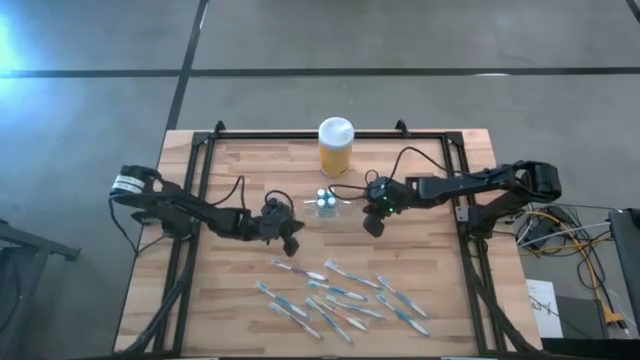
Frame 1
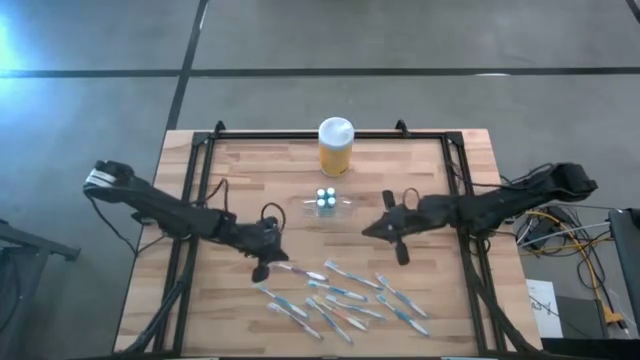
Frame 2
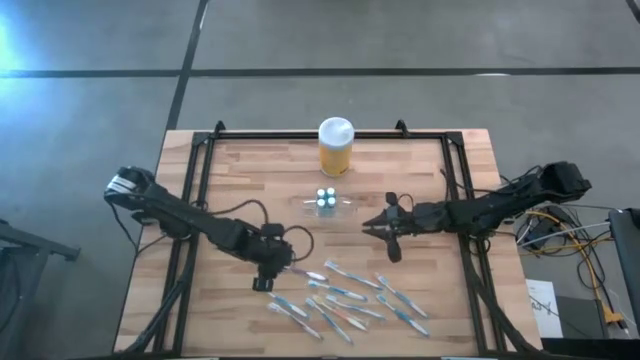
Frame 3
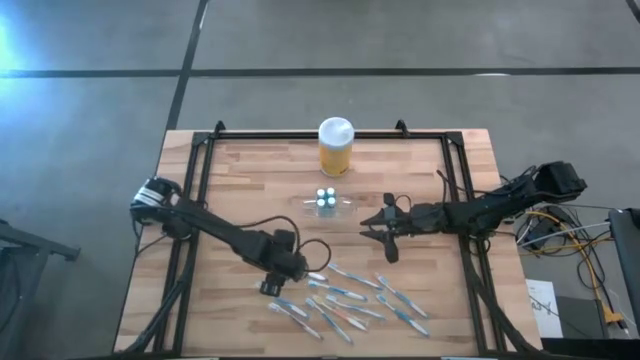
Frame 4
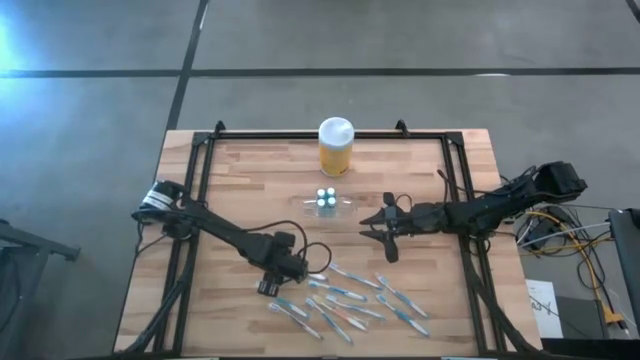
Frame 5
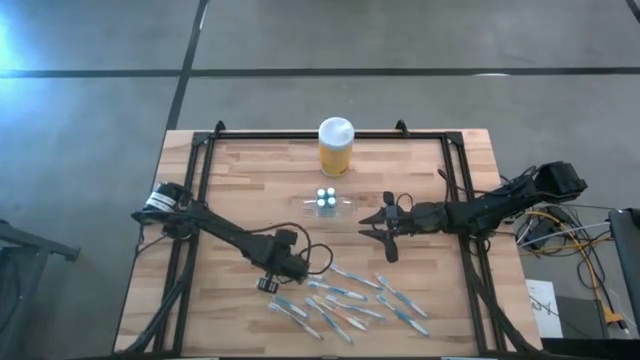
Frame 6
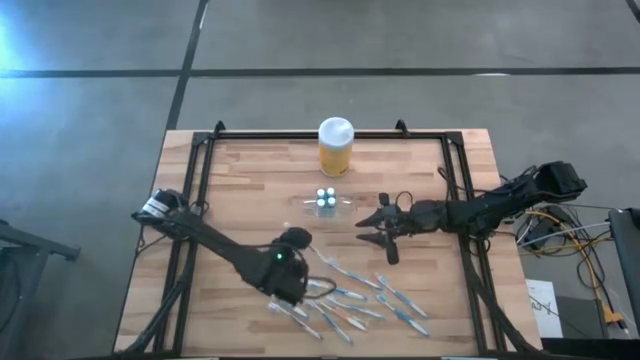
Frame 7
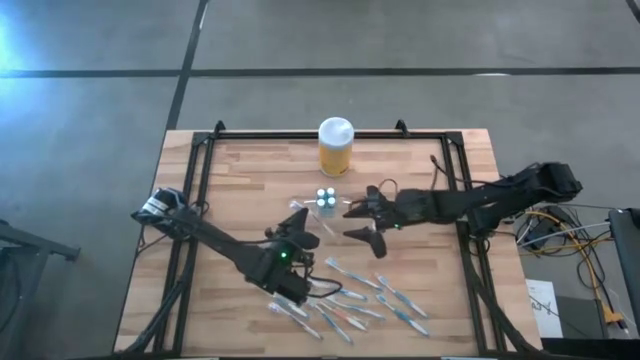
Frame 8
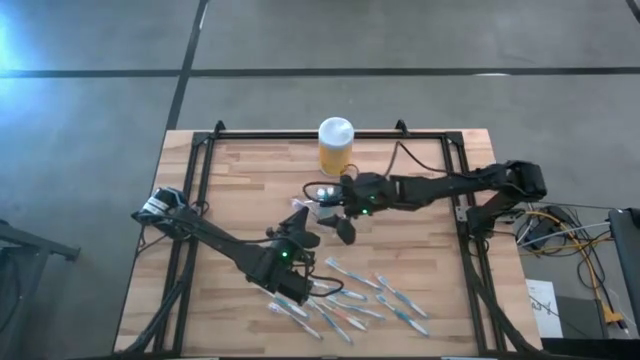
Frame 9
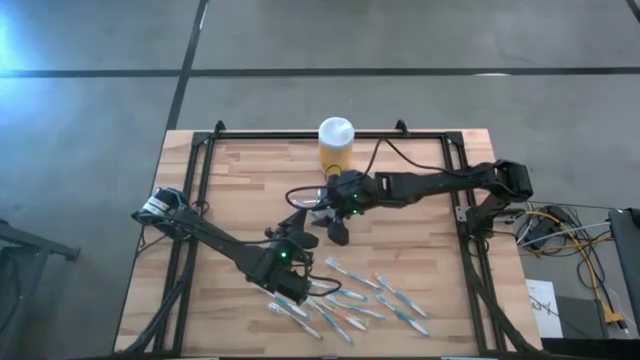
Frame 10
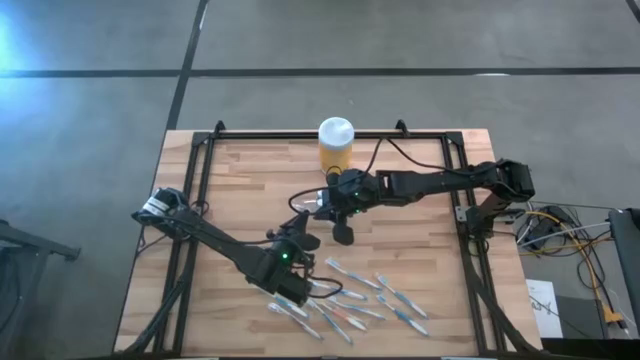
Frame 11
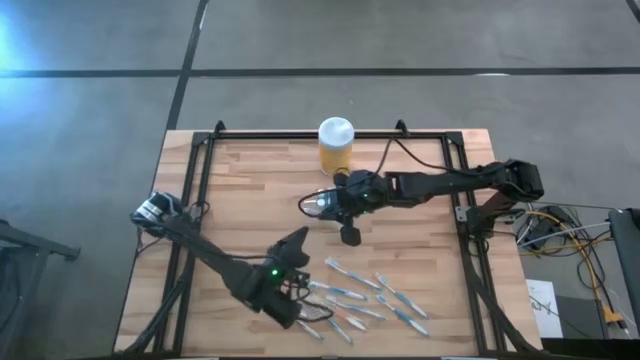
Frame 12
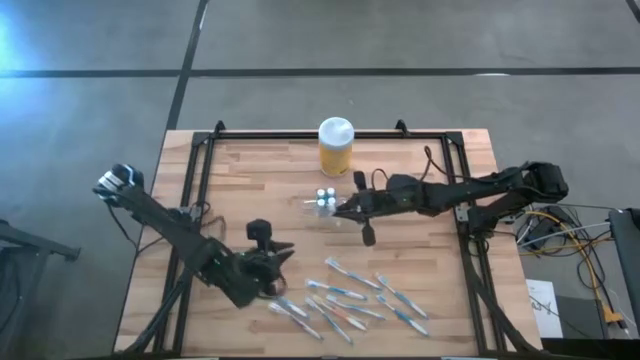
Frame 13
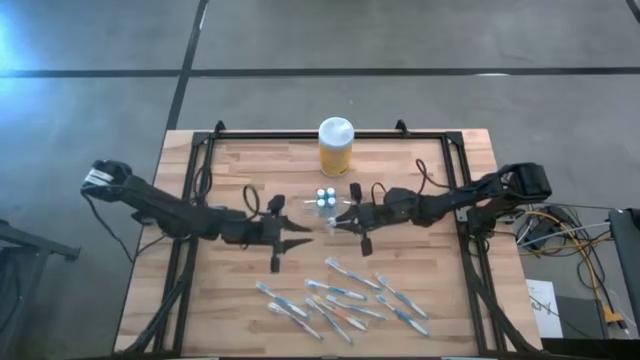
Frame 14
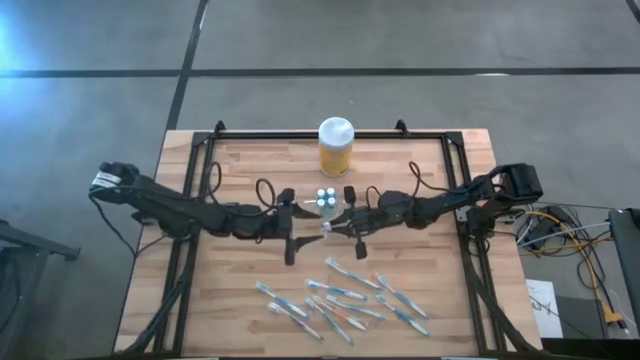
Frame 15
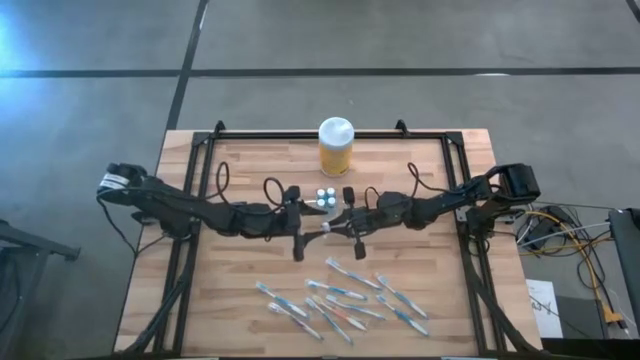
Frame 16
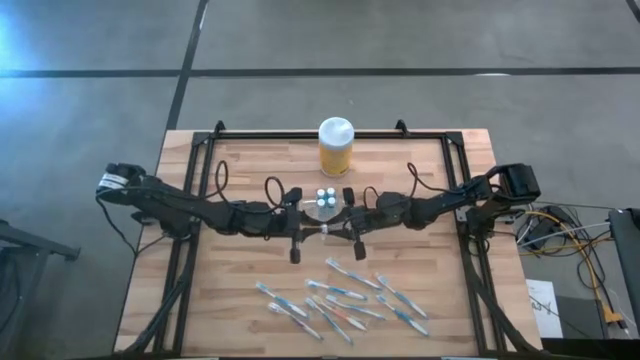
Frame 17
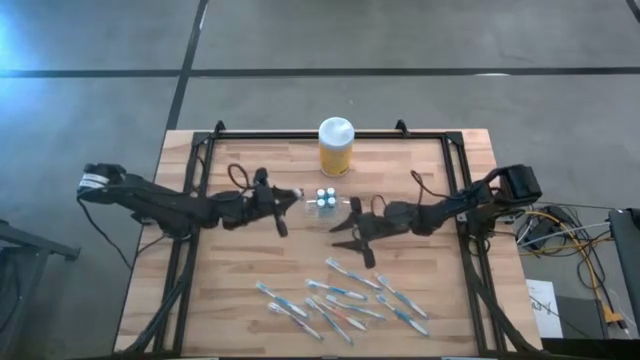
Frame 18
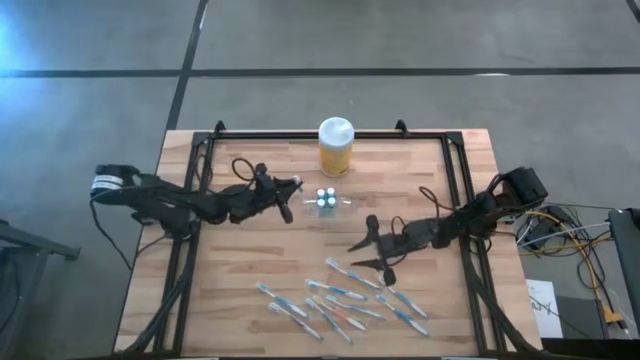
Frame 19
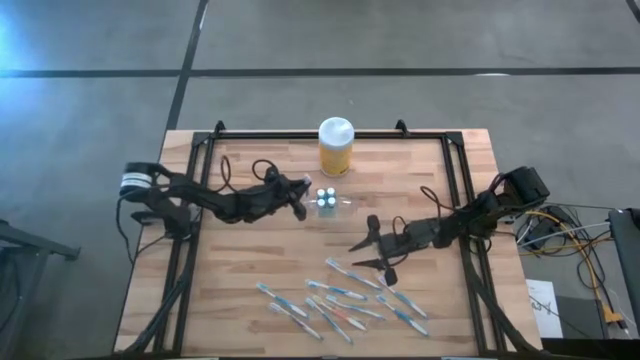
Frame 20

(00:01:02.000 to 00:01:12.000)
Task: Pick & Place toothbrushing station
Put the purple toothbrush into the transparent organizer

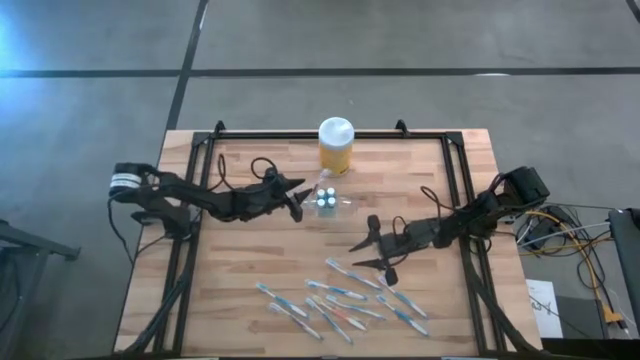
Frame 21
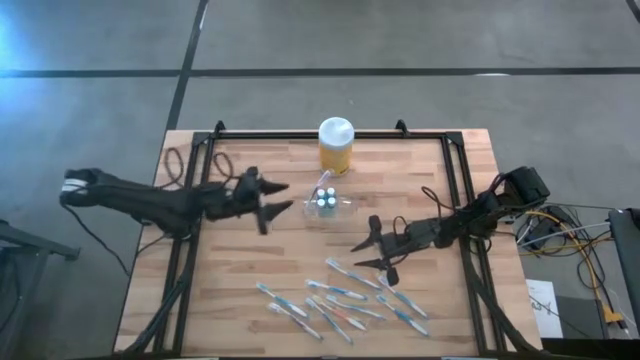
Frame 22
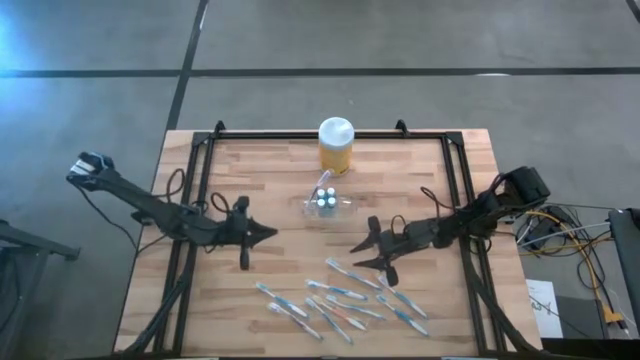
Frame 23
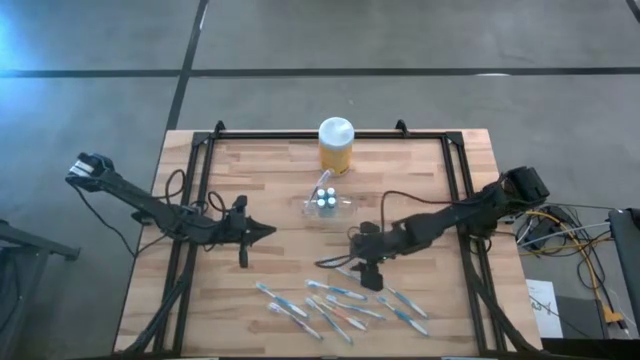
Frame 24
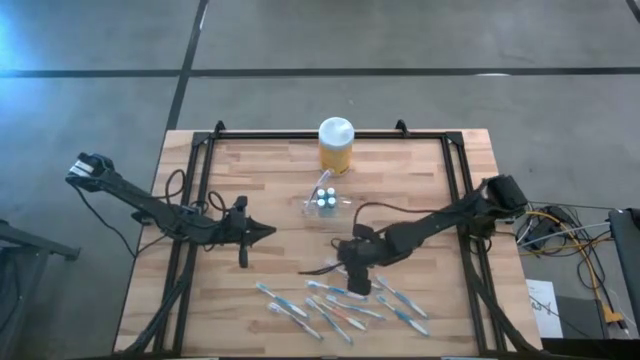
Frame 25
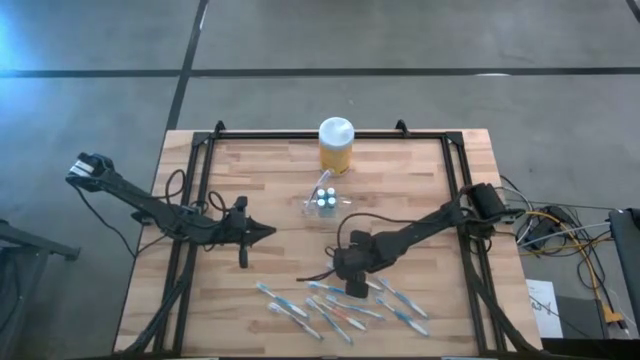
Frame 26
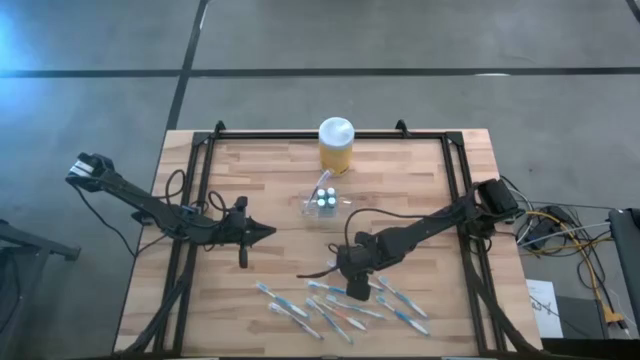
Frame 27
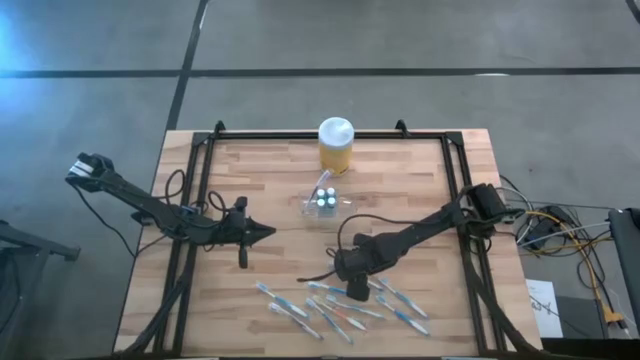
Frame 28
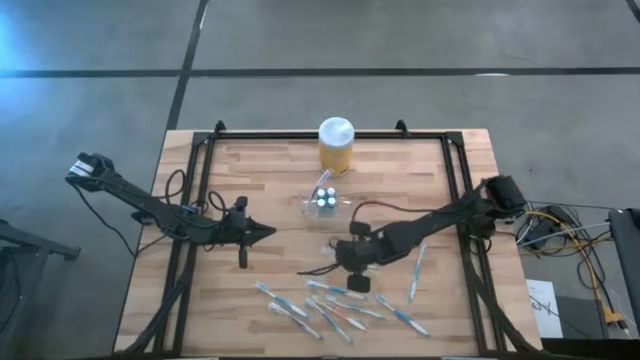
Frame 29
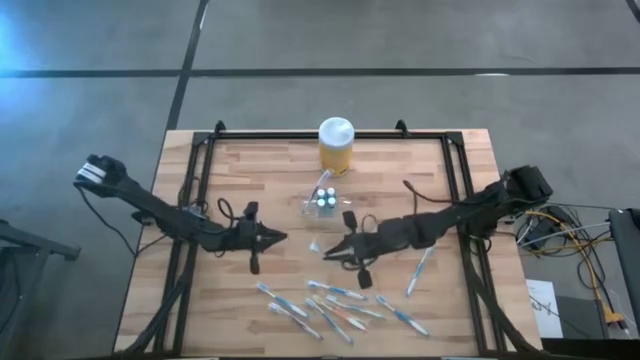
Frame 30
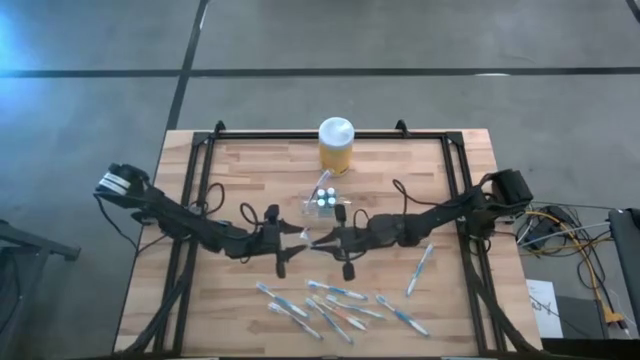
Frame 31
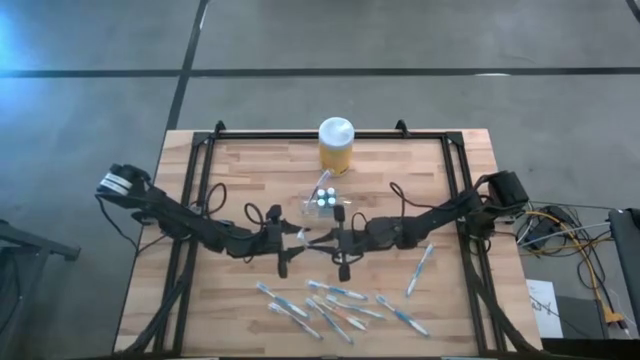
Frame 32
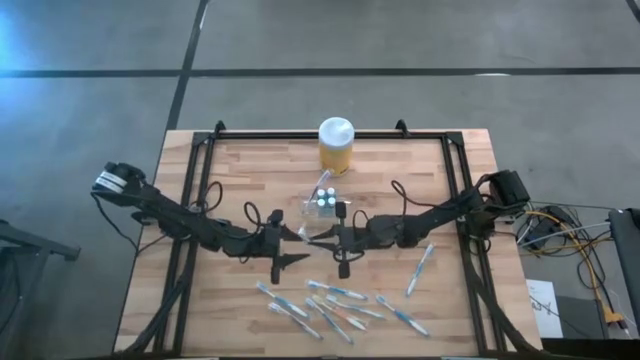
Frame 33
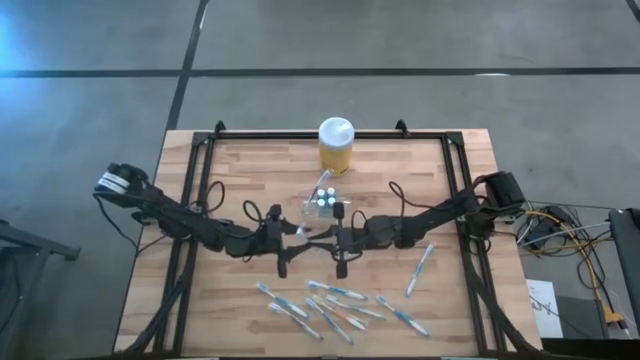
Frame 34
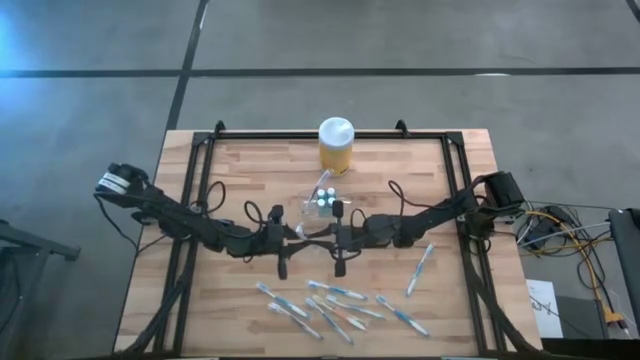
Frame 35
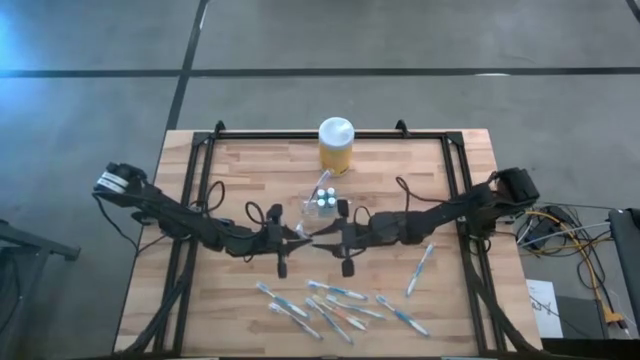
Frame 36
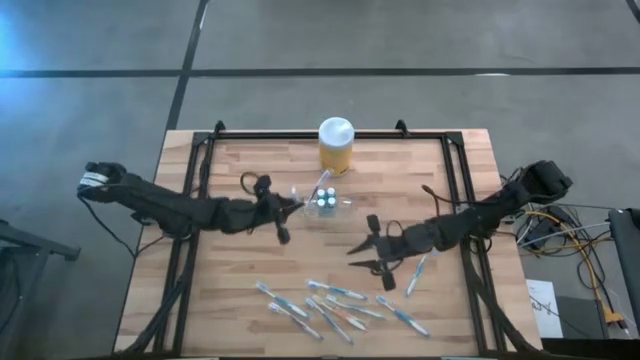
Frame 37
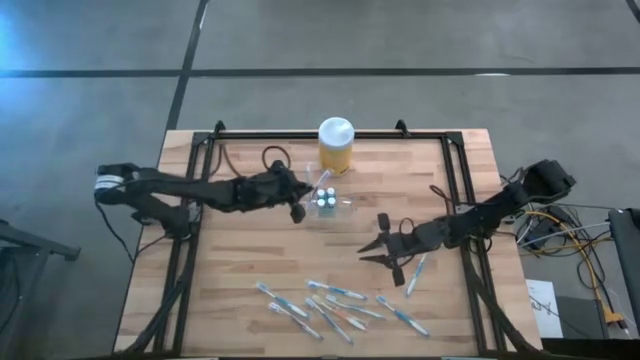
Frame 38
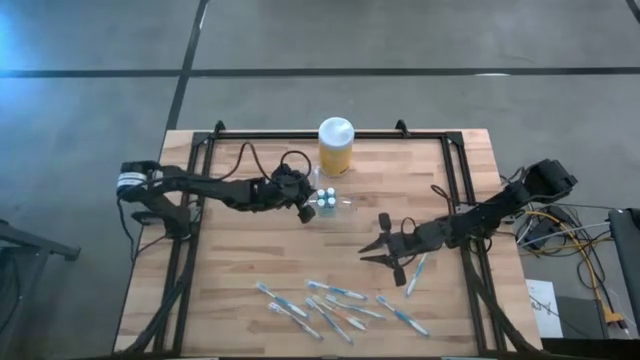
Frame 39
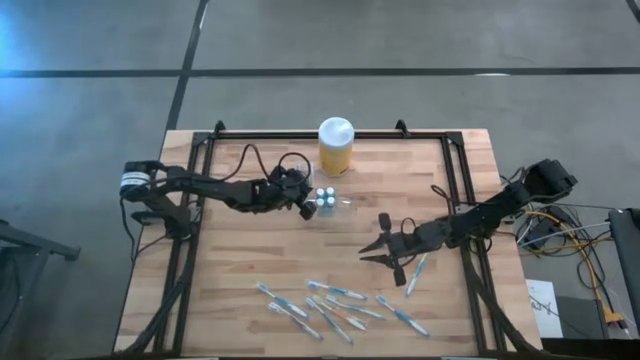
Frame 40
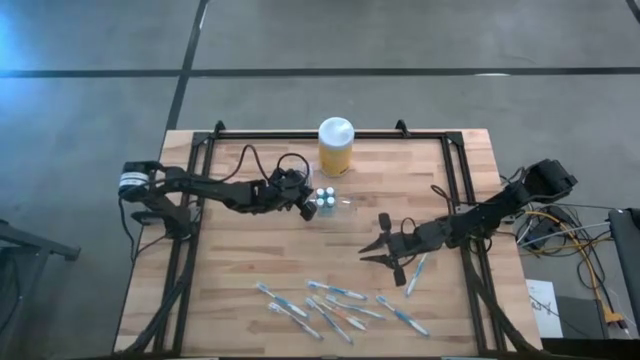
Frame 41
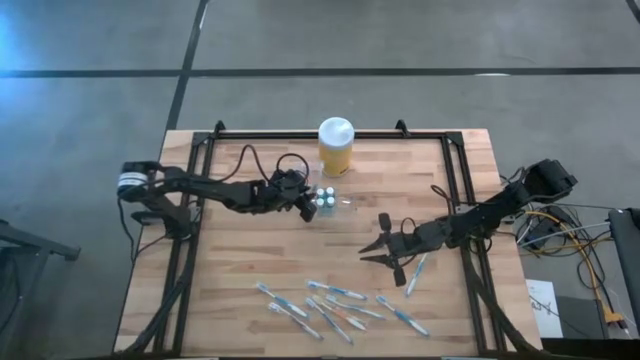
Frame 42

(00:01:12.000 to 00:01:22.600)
Put the blue toothbrush into the transparent organizer

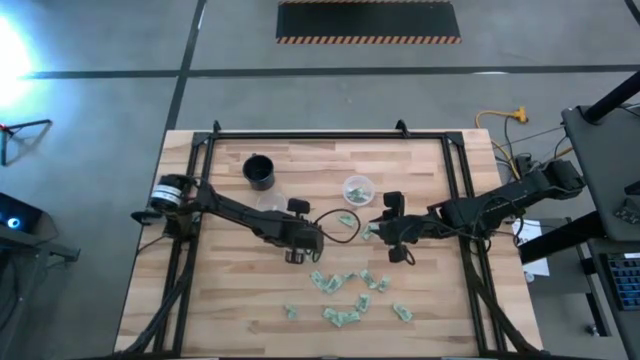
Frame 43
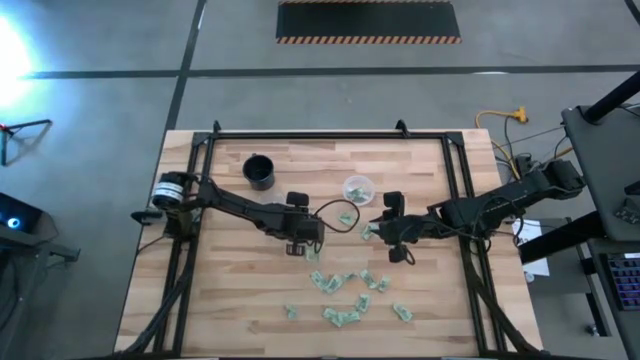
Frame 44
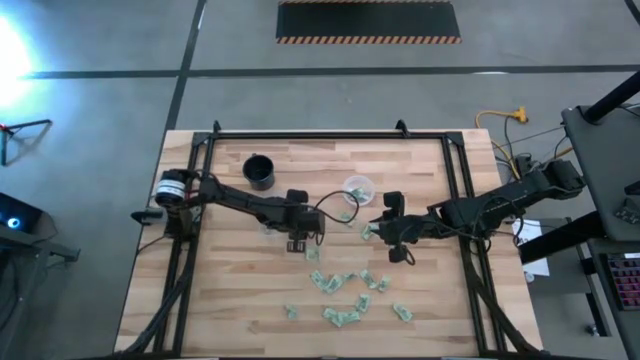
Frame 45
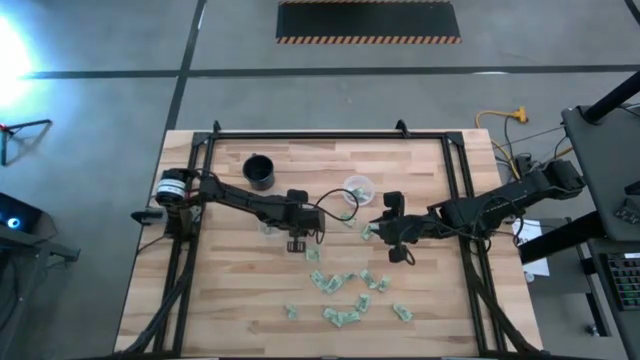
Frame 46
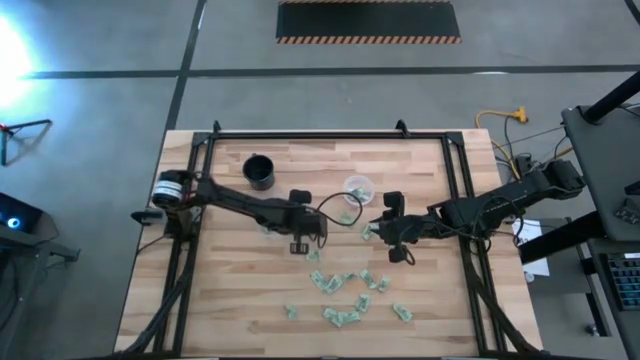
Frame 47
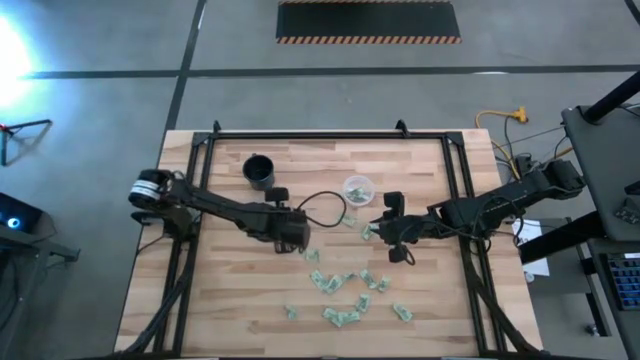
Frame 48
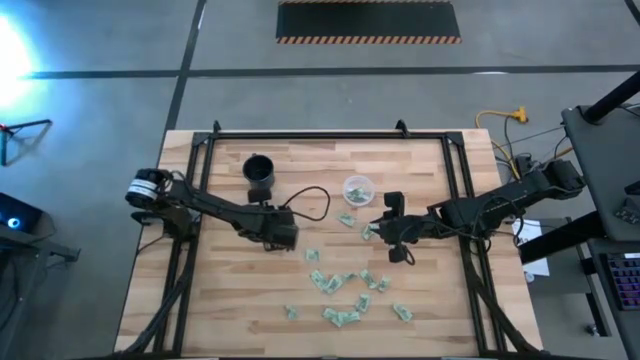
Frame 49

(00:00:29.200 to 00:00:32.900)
Task: Pick and place items into bin
Put the stevia packet into the left transparent bin
